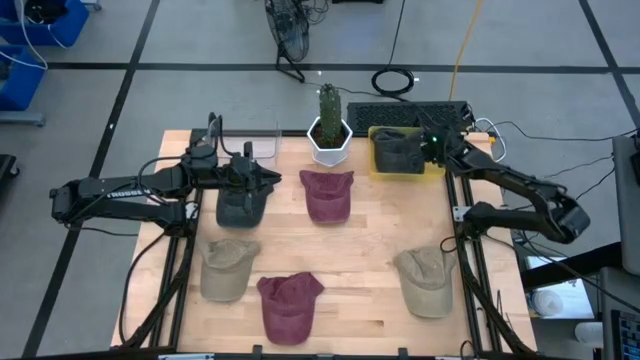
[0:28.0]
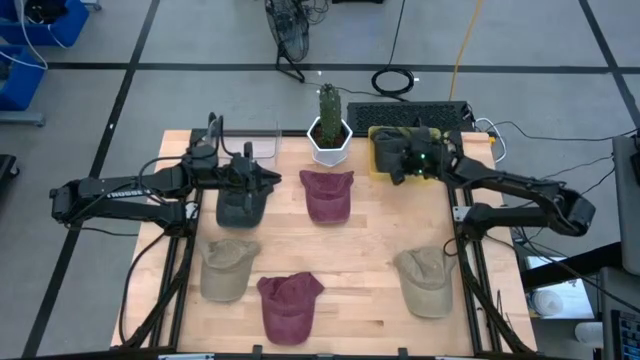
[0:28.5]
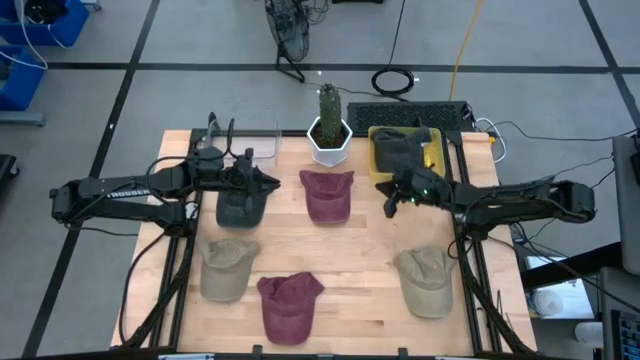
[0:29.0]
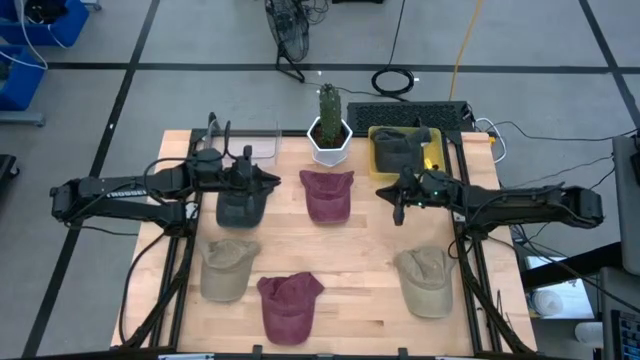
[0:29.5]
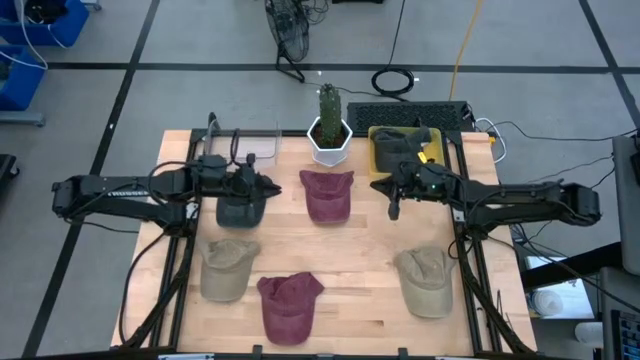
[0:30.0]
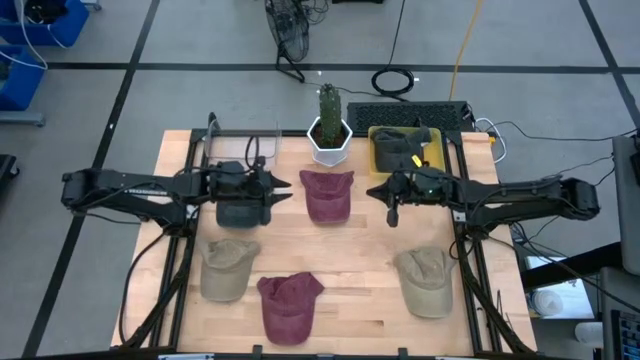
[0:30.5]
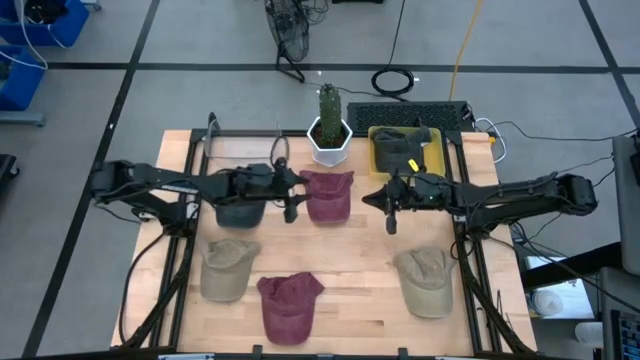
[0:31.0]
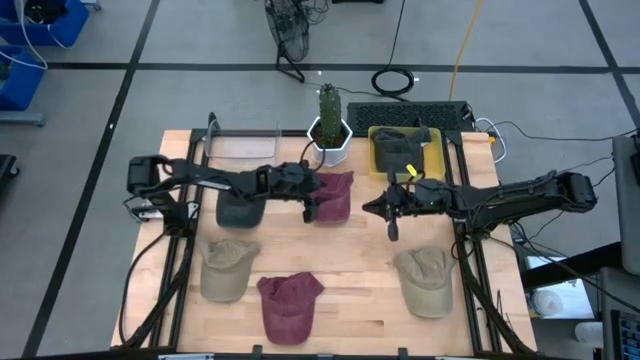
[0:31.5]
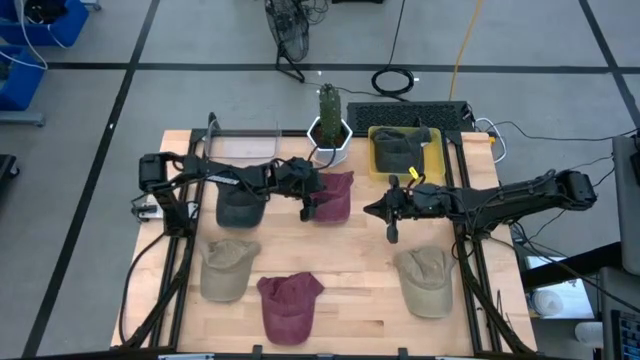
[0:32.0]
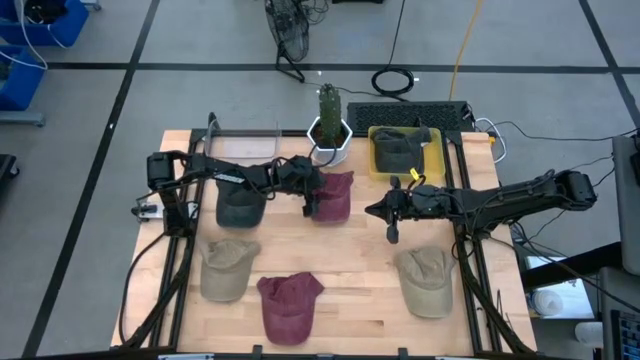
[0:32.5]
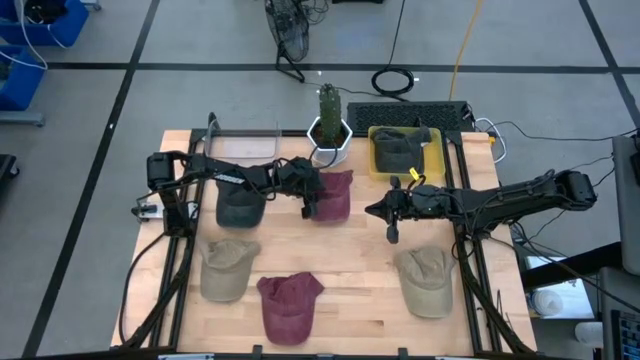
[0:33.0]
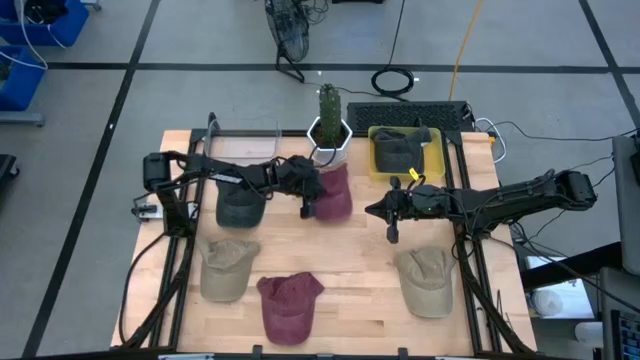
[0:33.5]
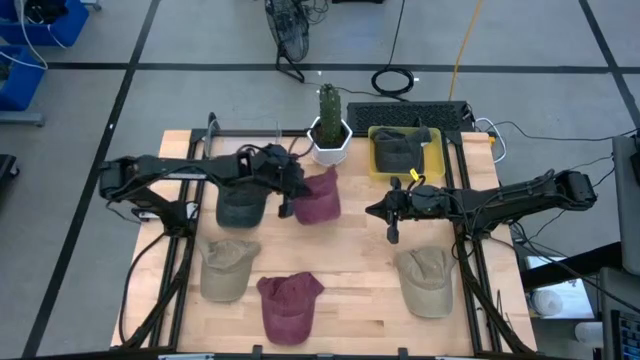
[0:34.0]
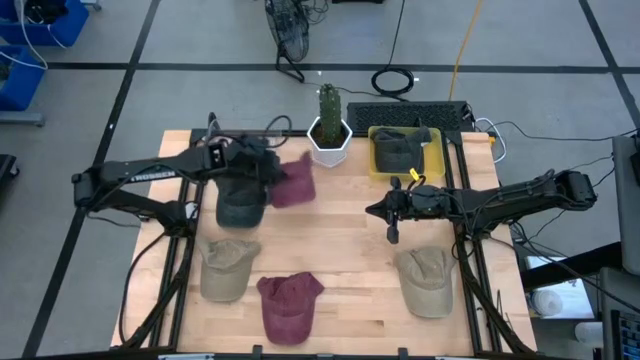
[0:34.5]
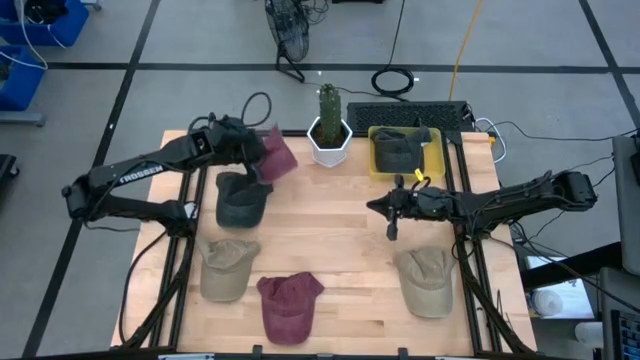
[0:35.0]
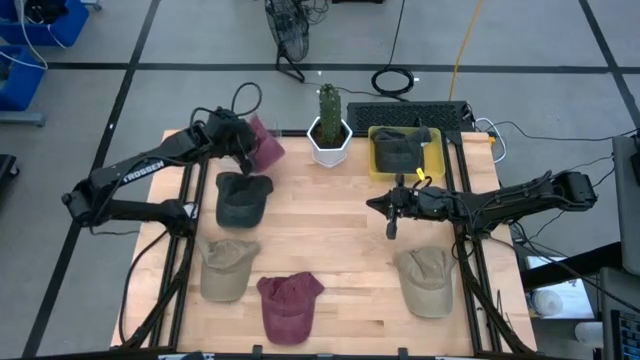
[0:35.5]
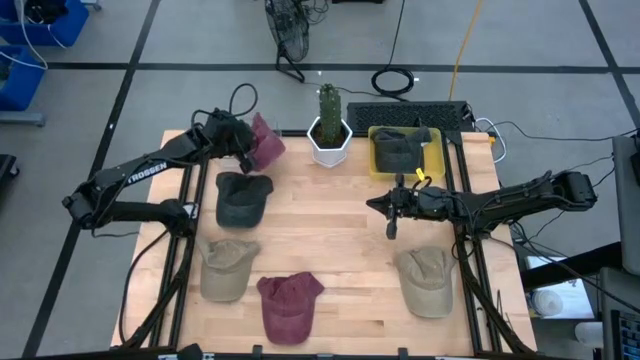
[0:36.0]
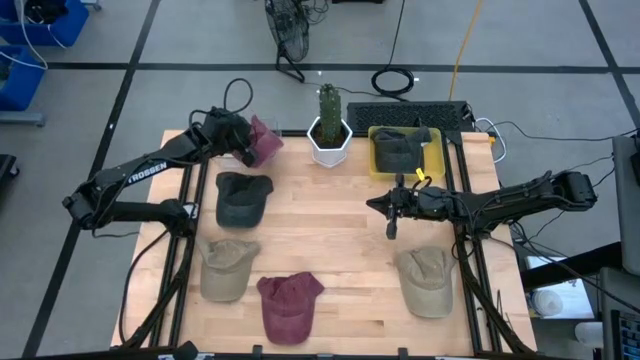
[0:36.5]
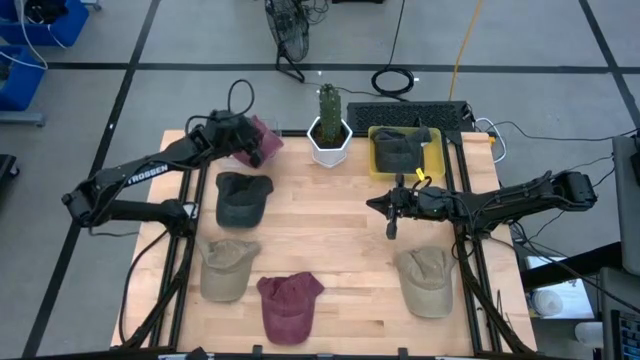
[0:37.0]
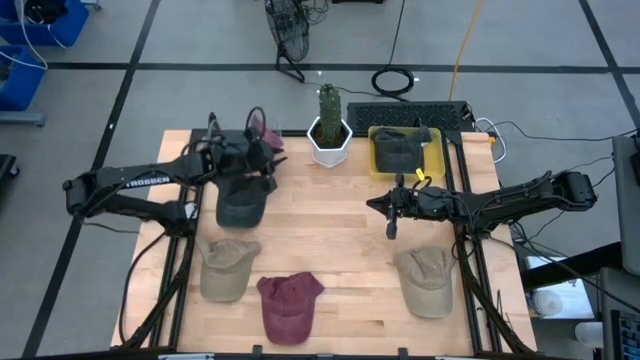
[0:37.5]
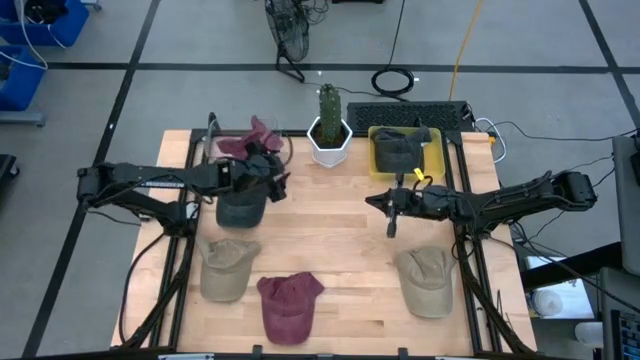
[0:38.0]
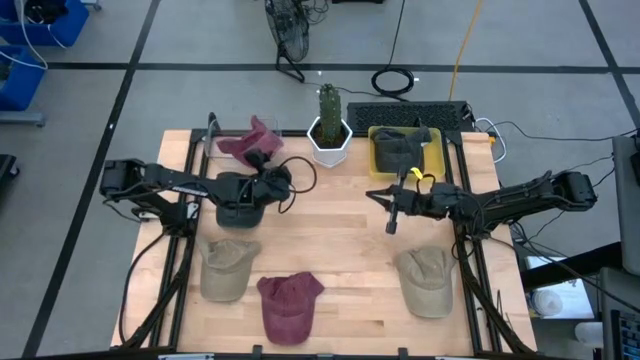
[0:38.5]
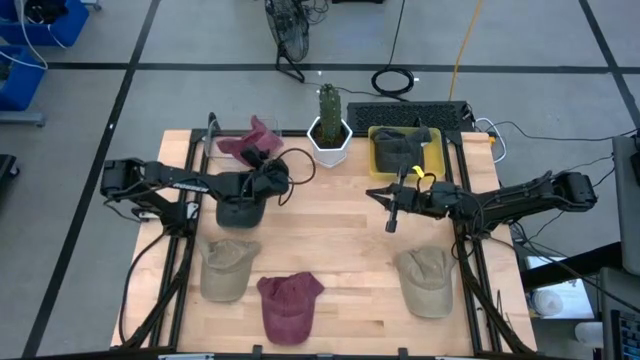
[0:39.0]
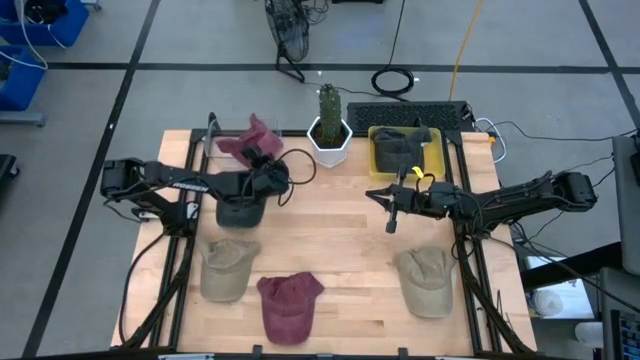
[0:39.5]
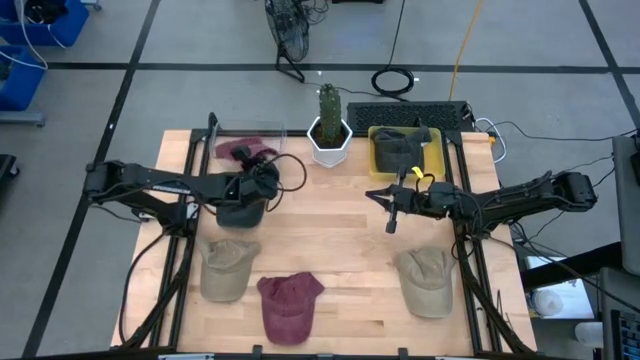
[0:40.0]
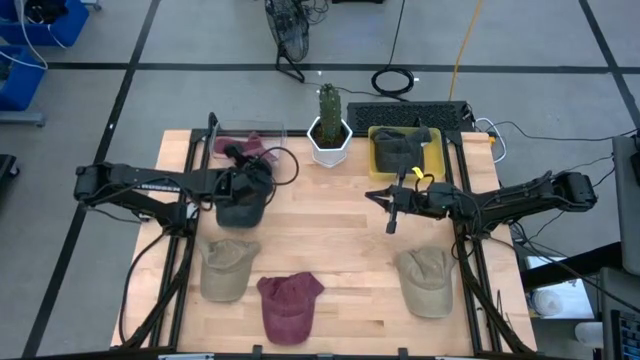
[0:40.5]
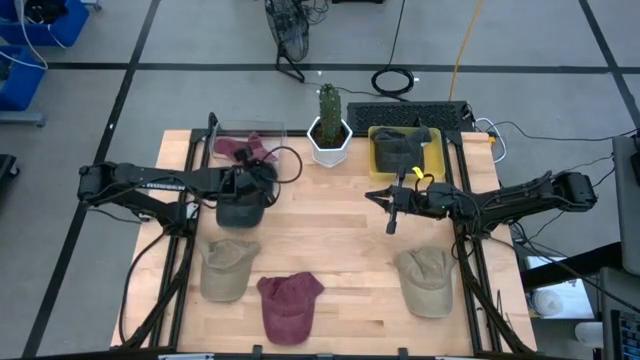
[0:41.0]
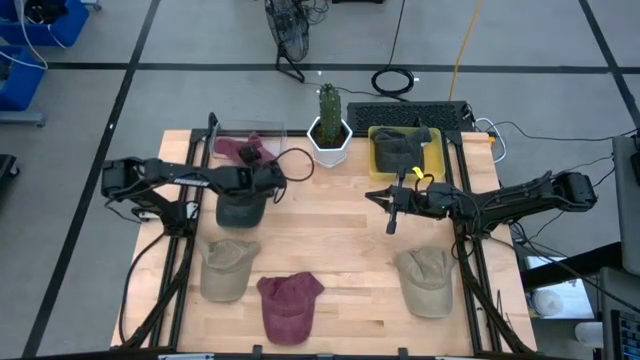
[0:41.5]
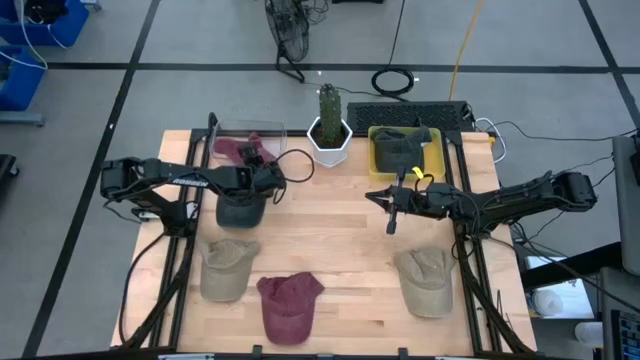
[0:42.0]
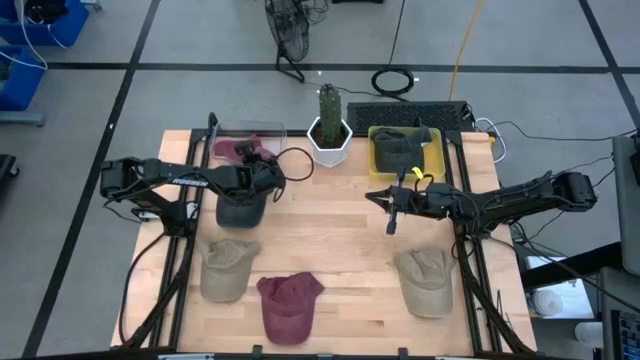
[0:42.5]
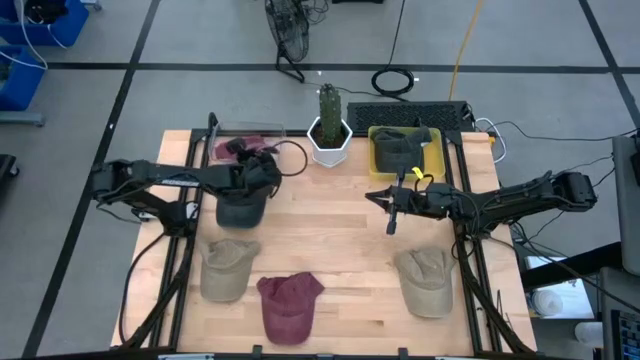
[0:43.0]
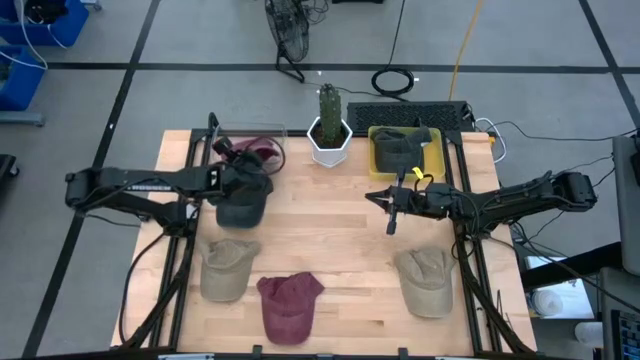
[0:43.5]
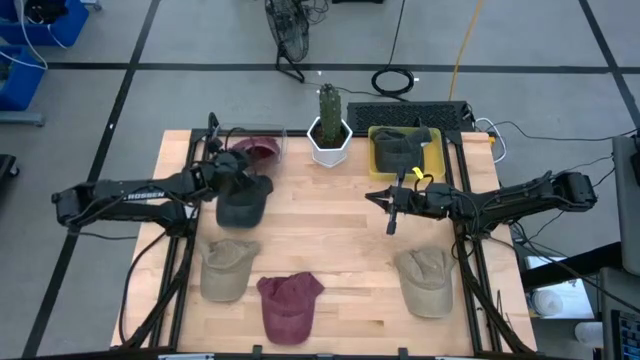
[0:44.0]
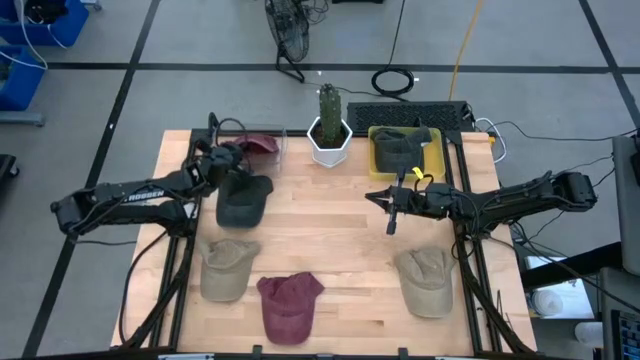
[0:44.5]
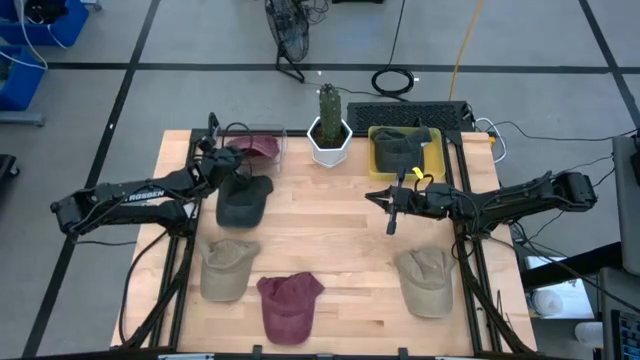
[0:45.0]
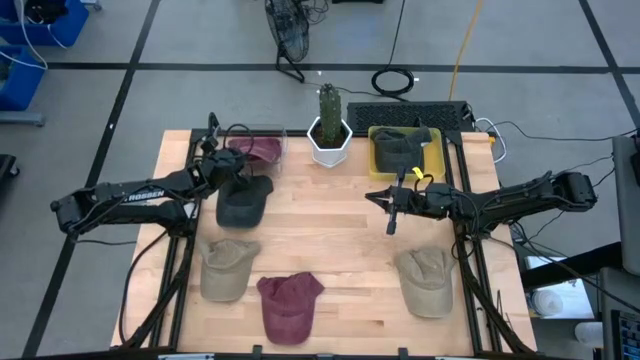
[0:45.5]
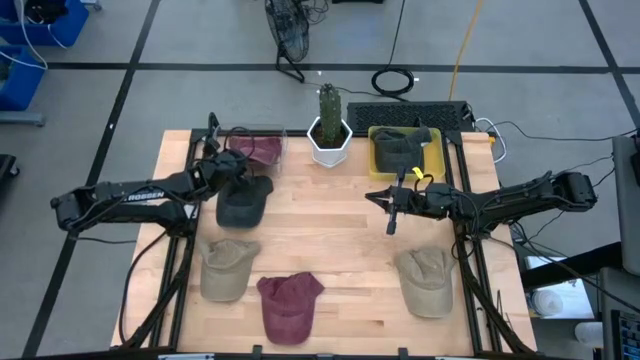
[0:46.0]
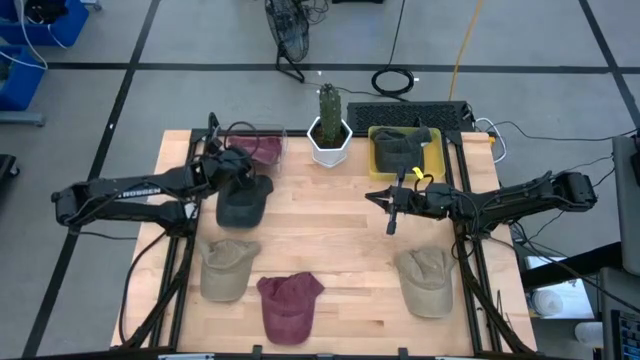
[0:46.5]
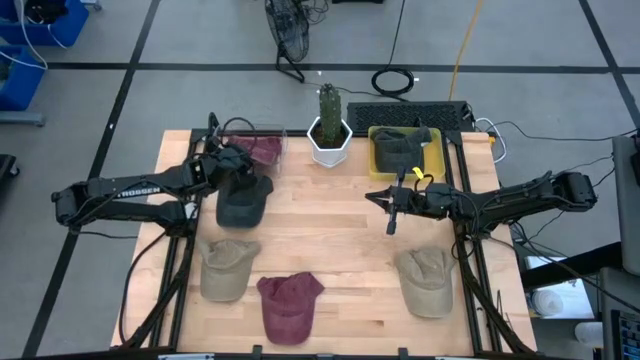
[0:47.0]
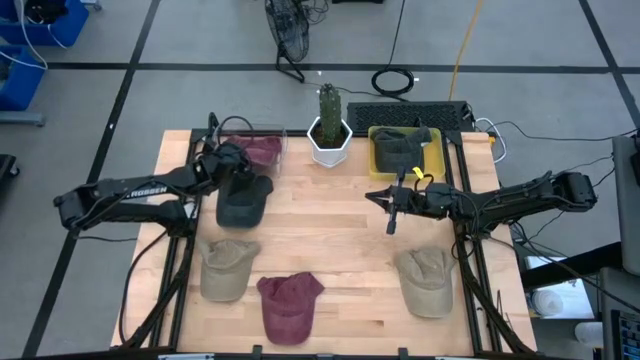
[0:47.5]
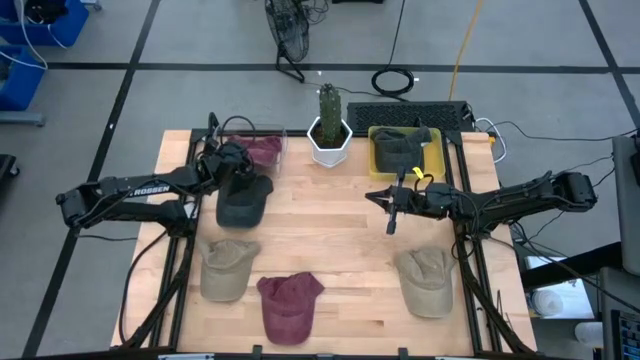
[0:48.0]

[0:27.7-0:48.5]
Task: Pick & Place hat
Put the top red cap into the transparent bin

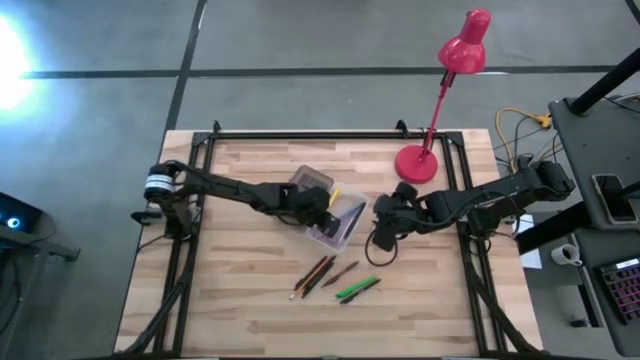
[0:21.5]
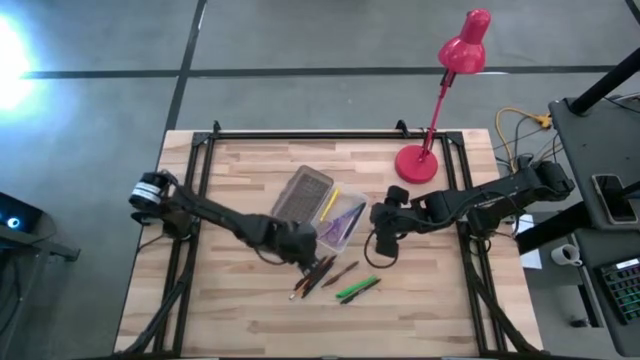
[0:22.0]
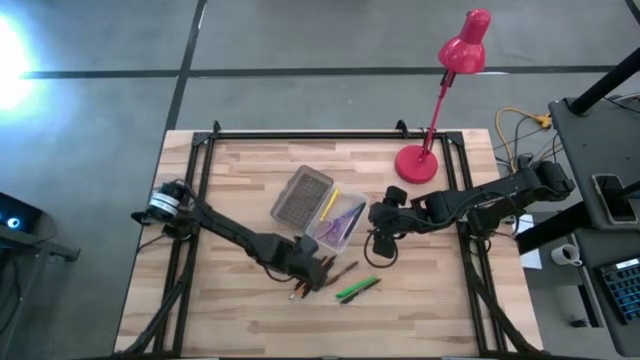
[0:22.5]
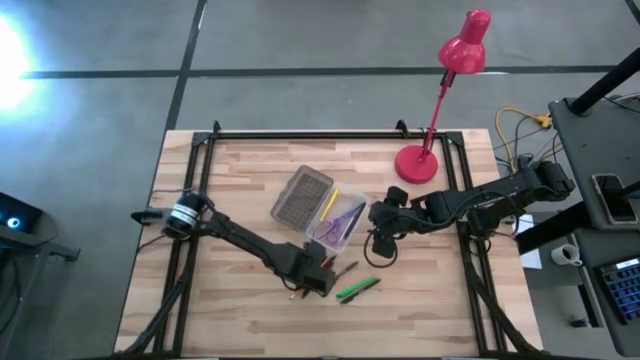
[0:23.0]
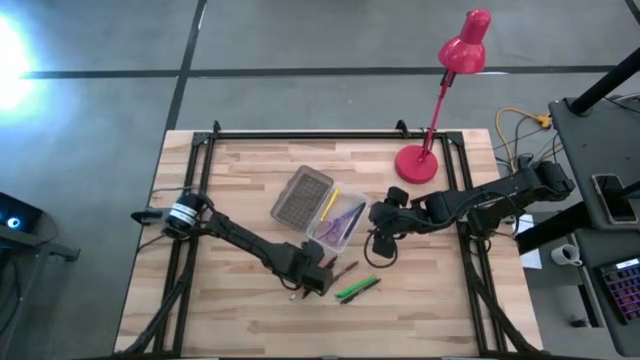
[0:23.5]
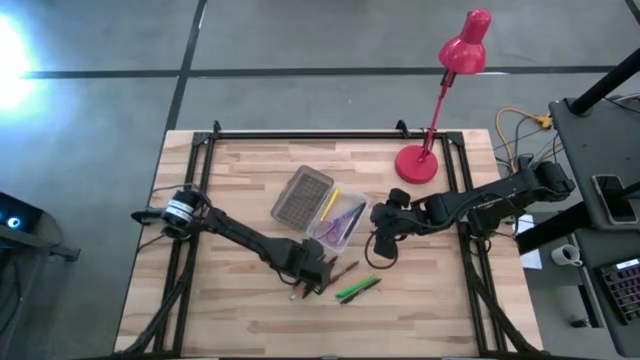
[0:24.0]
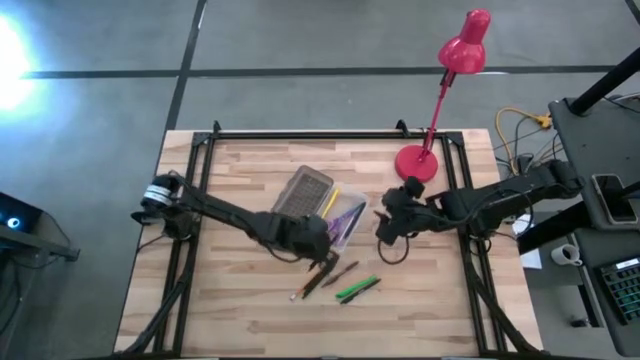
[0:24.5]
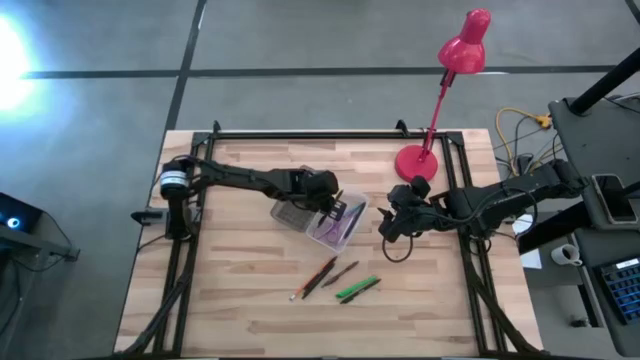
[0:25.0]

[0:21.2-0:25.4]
Task: Pick & place school supplies into a supply box
Put the black pen into the gray supply box
